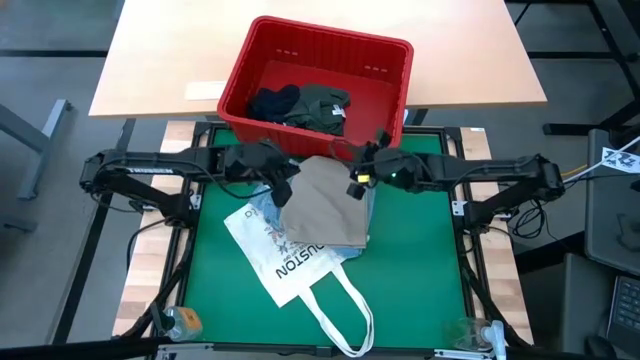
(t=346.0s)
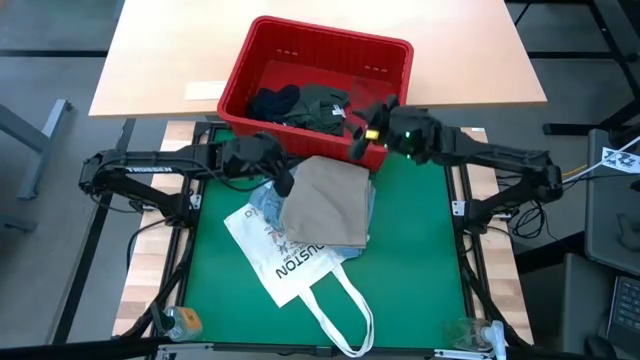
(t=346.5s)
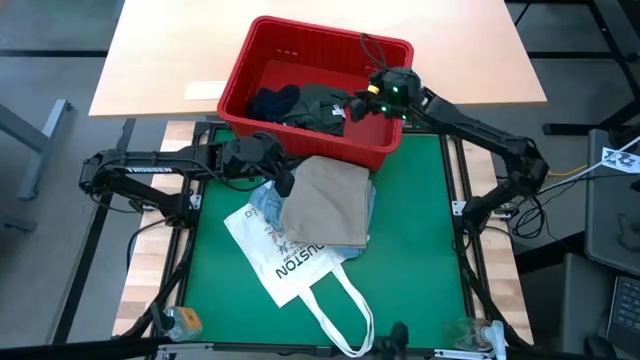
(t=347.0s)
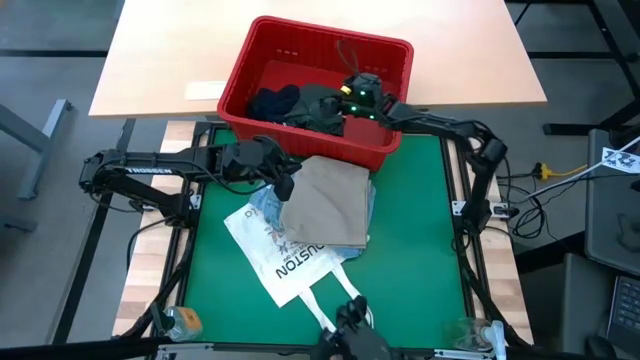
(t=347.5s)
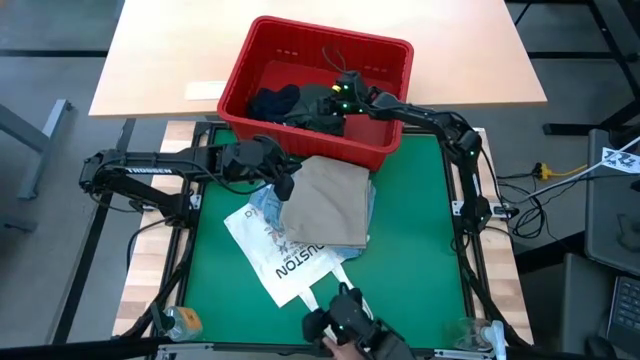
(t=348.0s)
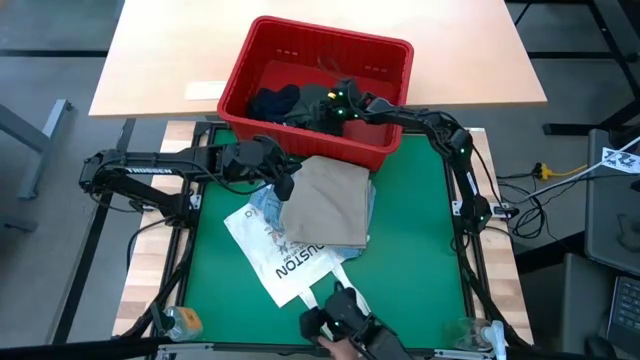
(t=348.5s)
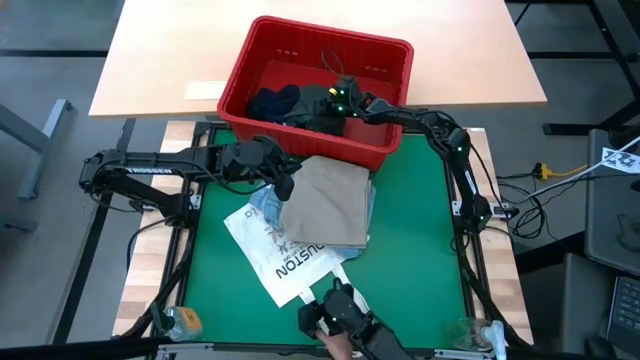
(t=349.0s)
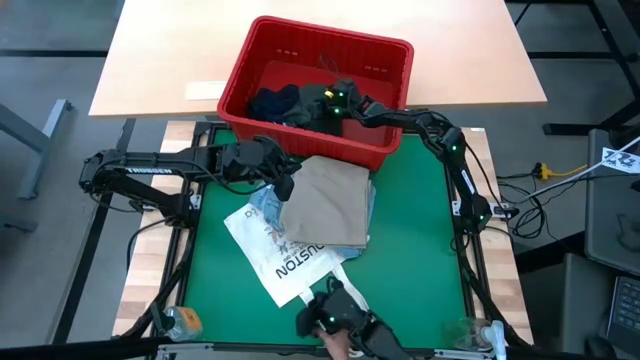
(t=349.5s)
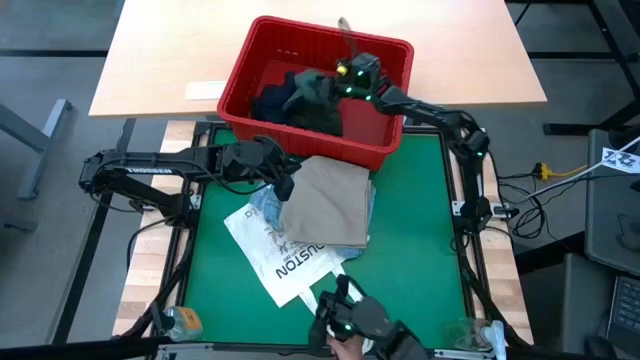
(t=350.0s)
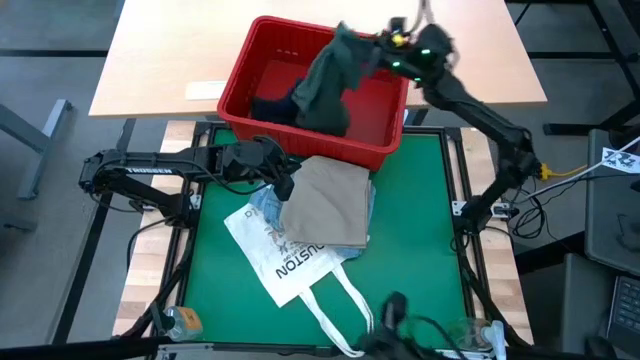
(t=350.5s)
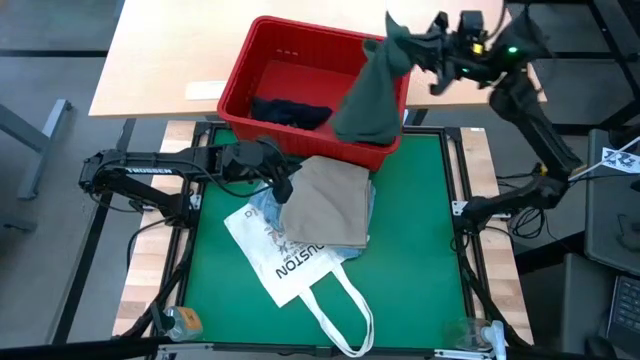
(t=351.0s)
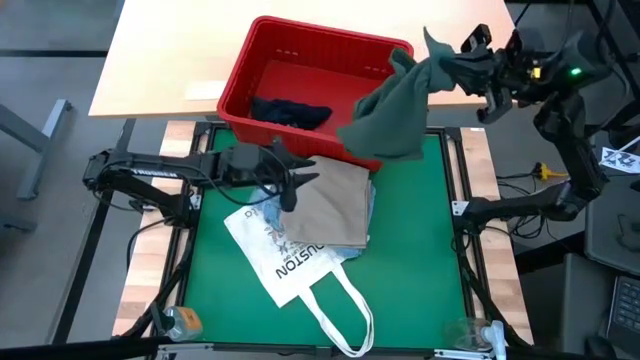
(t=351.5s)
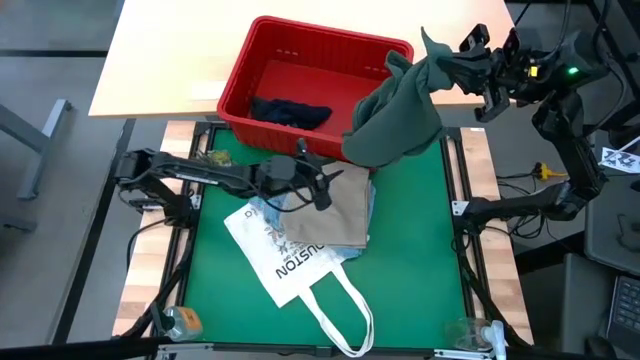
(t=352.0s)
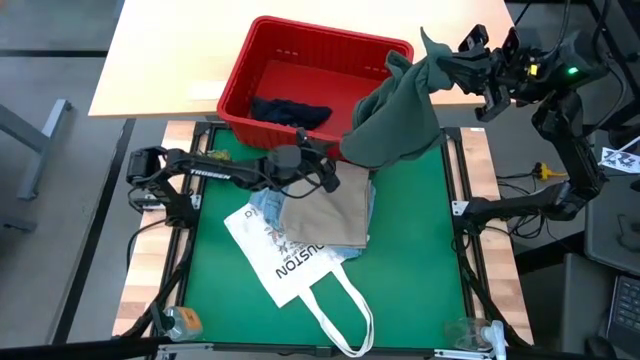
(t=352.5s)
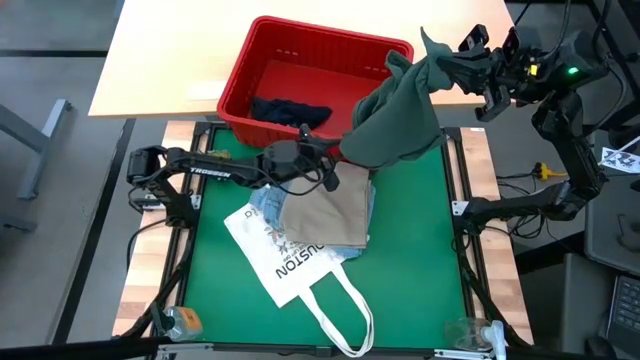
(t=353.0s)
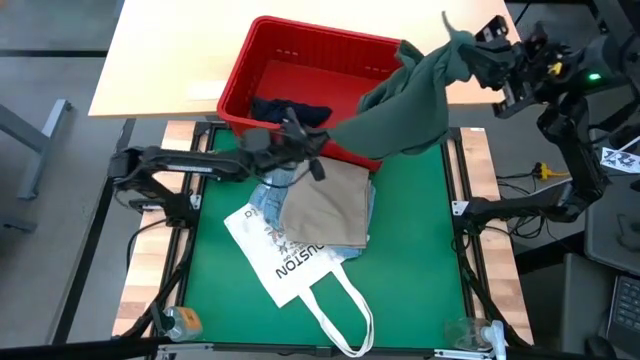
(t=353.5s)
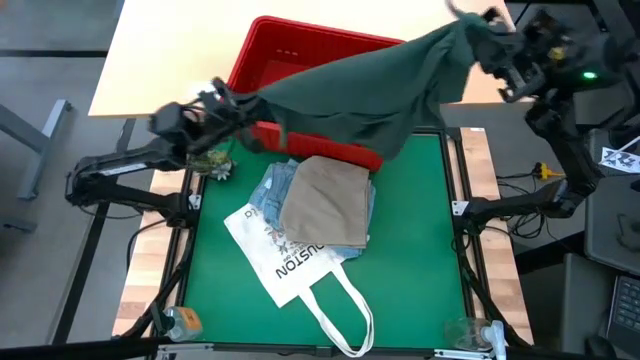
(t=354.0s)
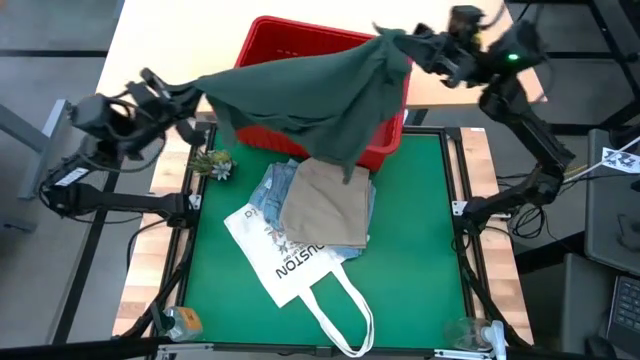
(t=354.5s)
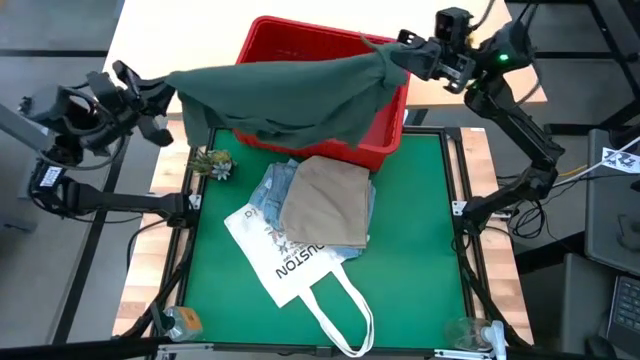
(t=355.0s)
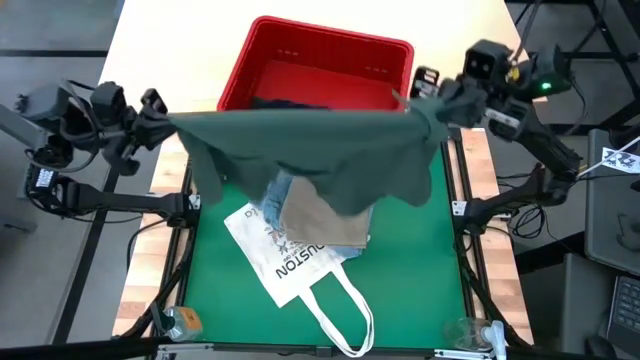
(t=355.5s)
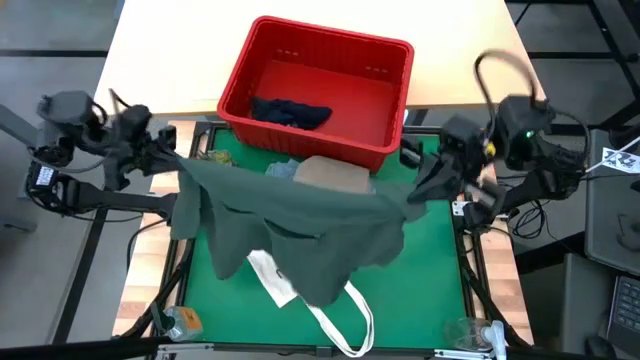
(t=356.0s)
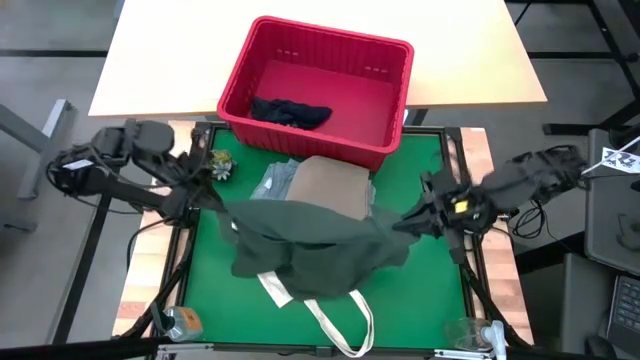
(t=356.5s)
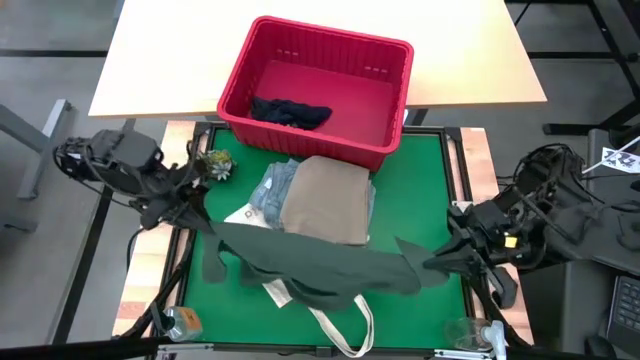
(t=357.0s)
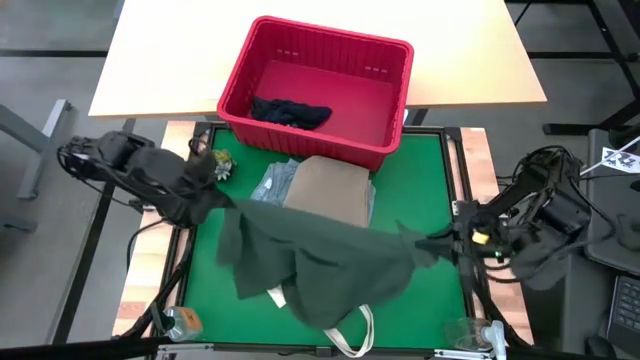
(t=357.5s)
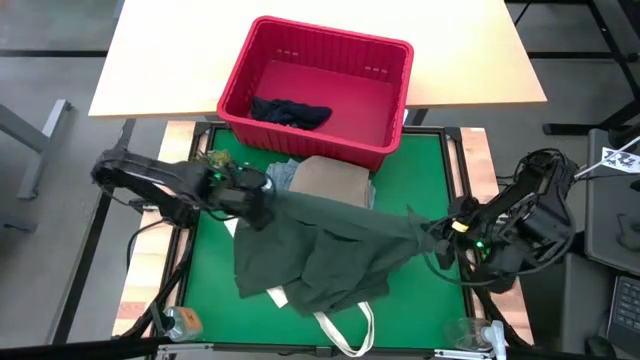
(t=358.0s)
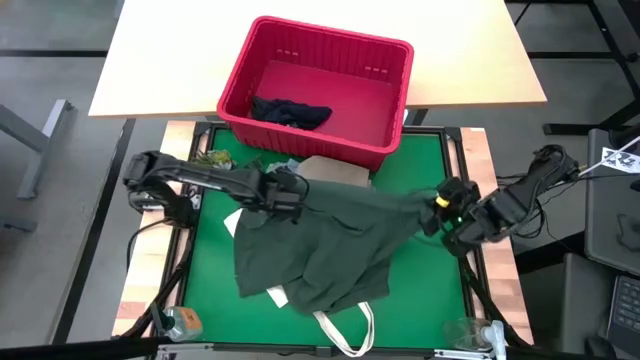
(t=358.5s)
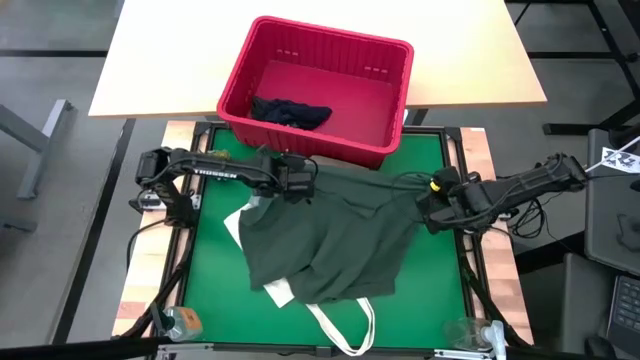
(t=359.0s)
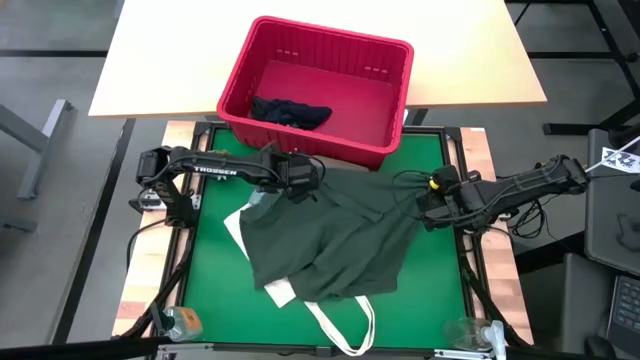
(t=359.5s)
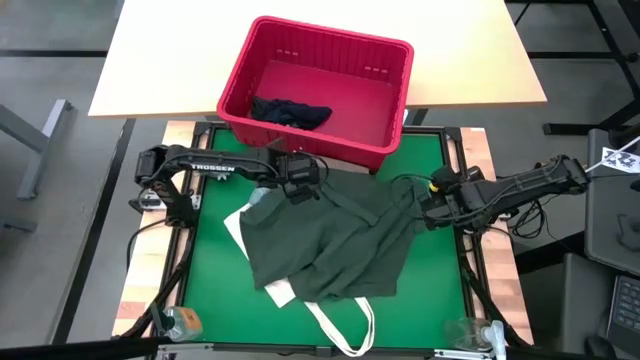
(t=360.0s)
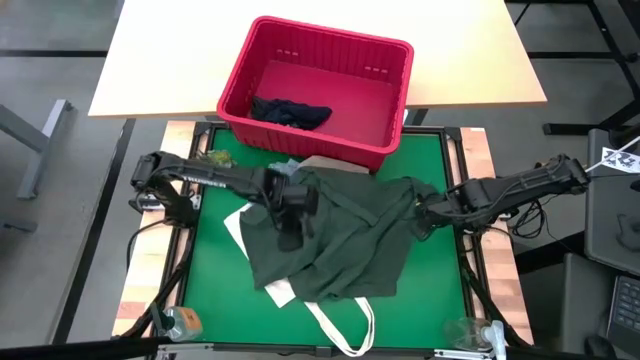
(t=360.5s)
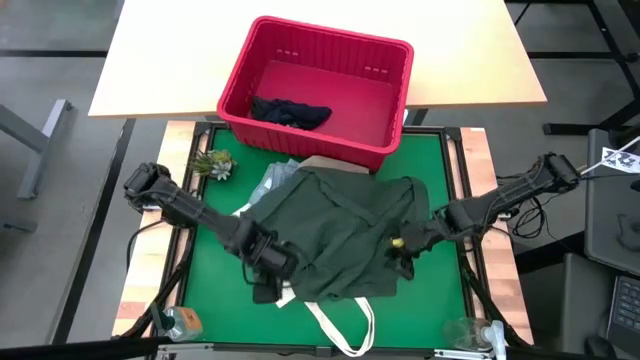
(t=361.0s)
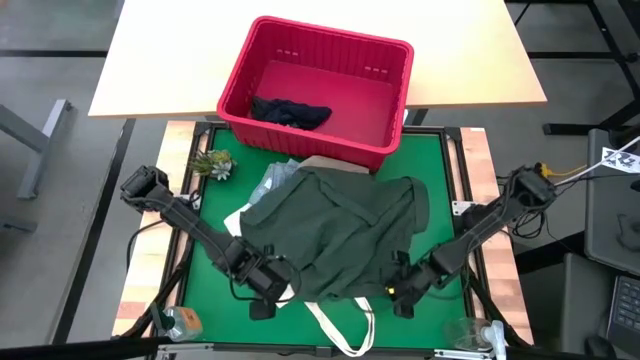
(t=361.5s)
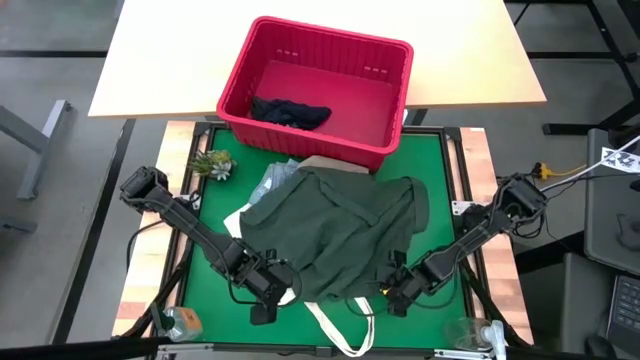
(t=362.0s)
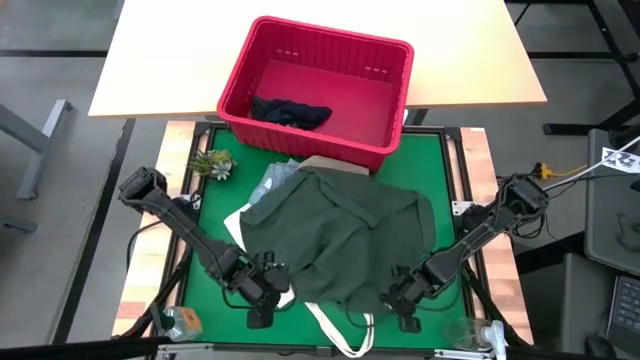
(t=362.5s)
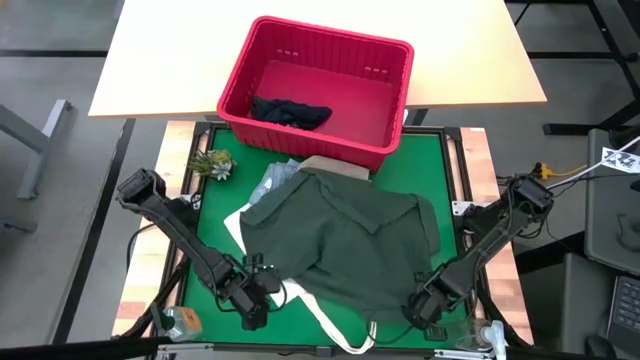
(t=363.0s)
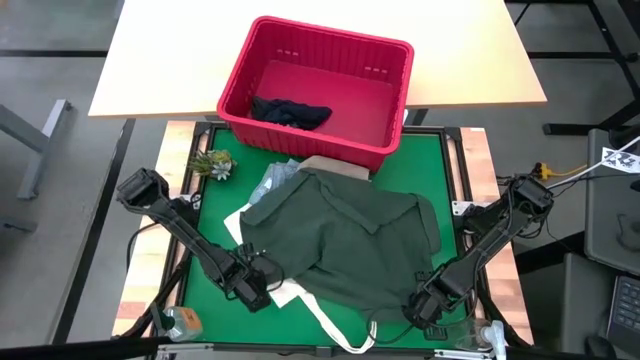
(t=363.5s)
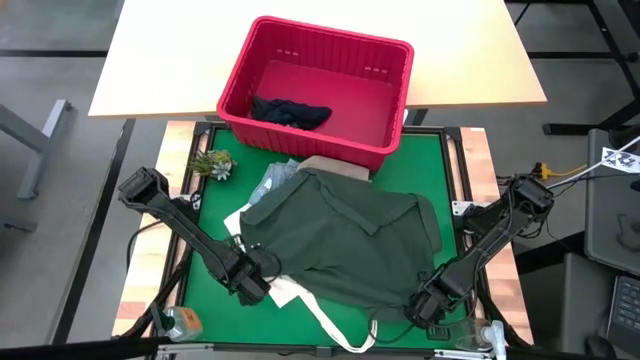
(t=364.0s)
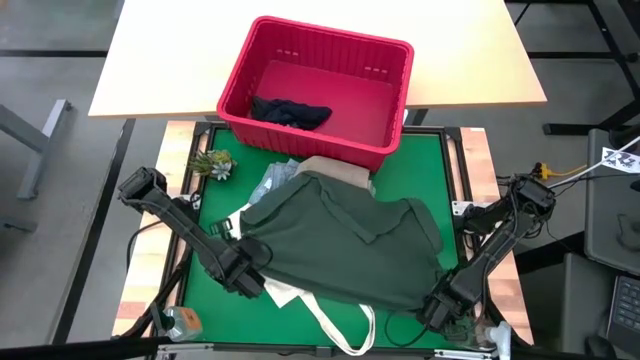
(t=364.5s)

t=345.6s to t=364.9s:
Task: Fold Laundry from Bin
Fold the green shirt
